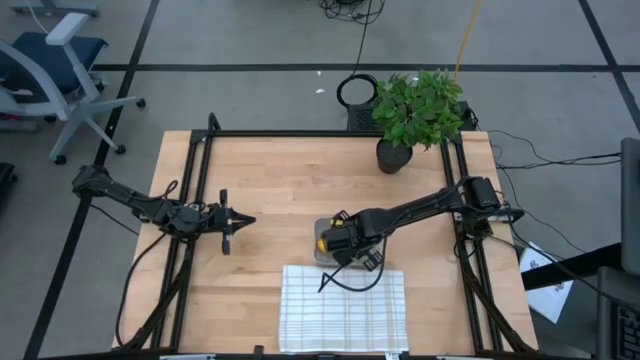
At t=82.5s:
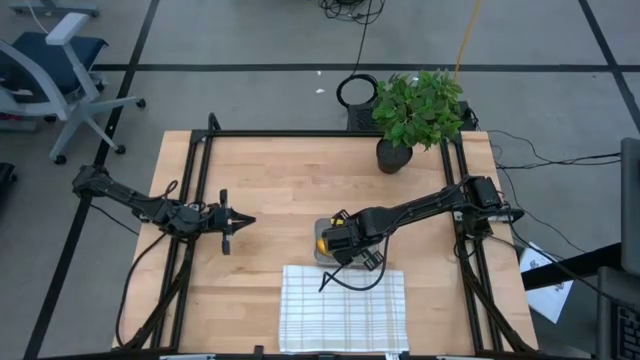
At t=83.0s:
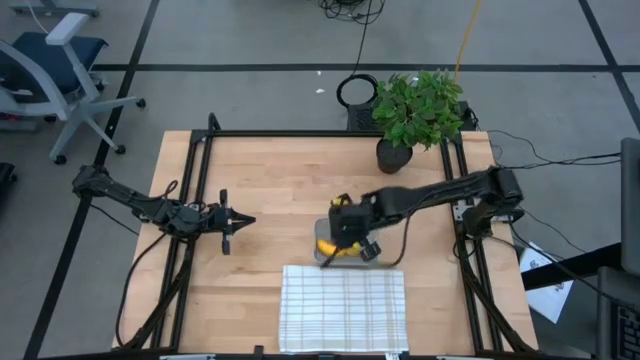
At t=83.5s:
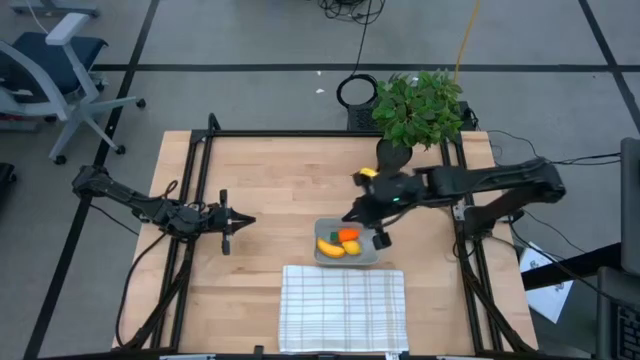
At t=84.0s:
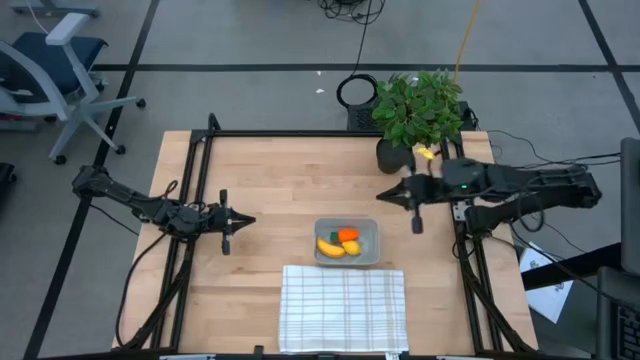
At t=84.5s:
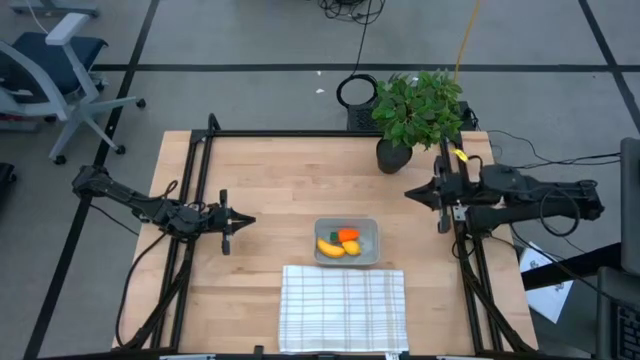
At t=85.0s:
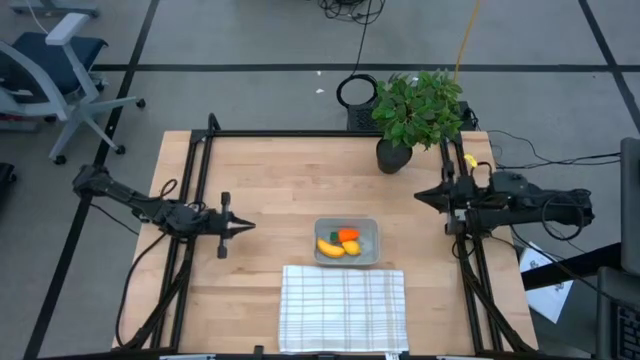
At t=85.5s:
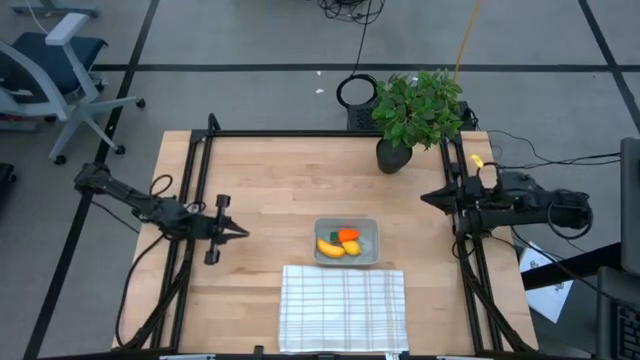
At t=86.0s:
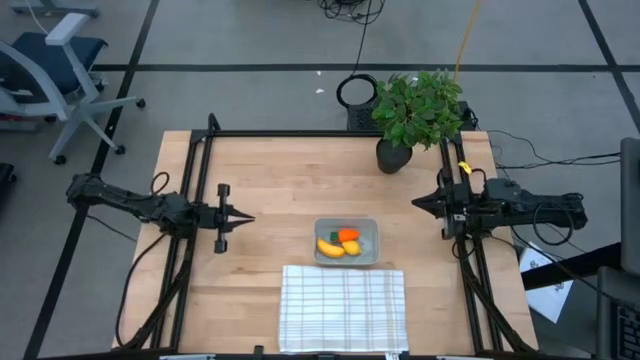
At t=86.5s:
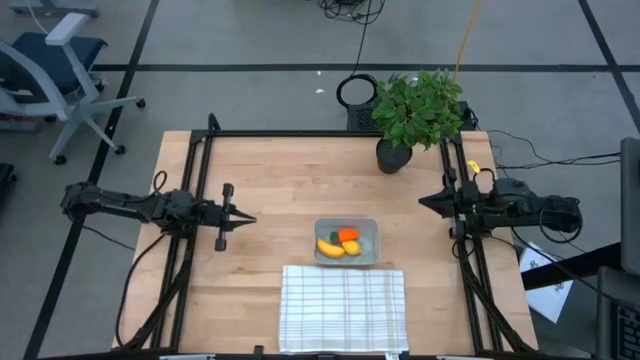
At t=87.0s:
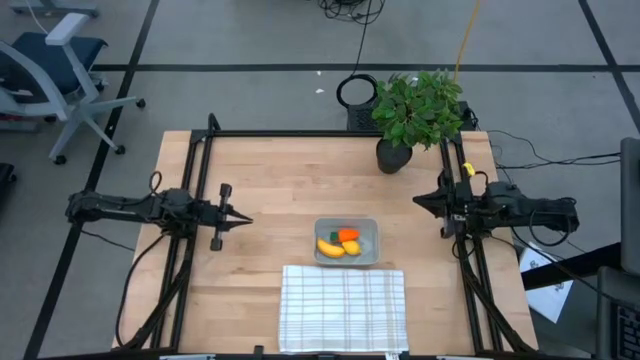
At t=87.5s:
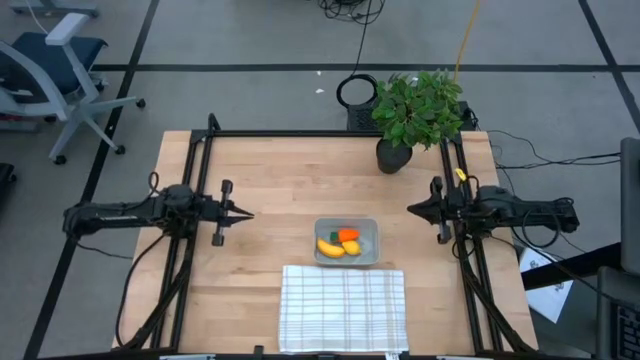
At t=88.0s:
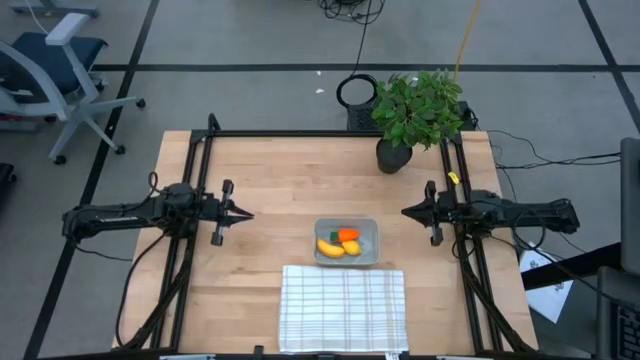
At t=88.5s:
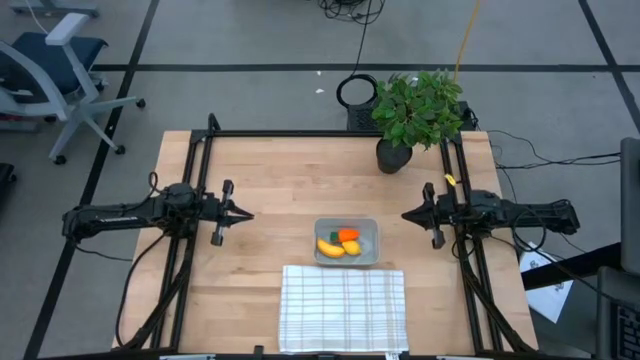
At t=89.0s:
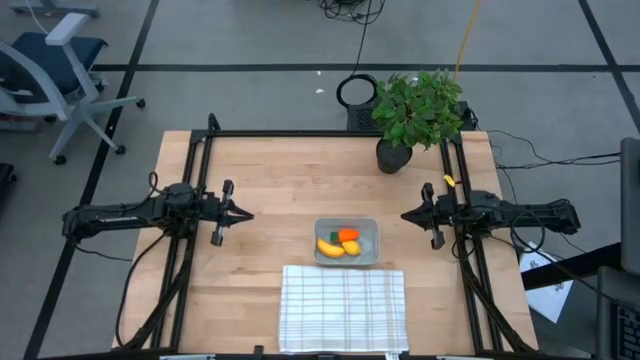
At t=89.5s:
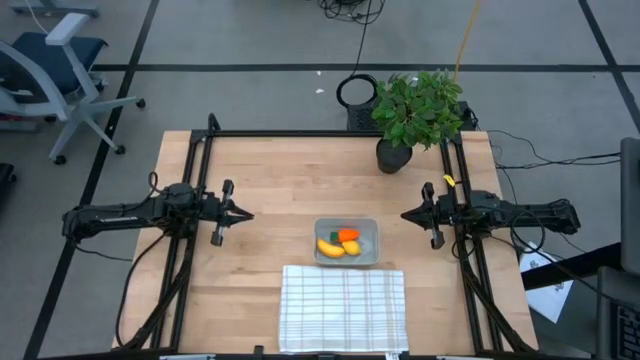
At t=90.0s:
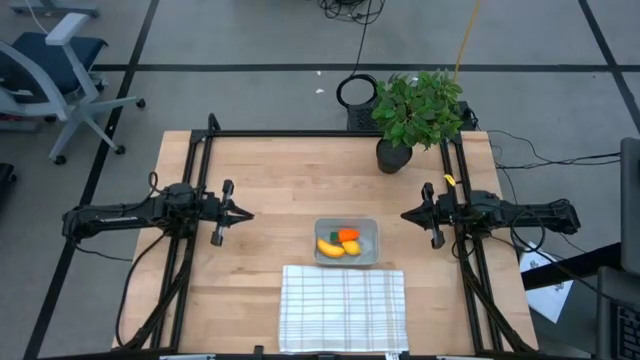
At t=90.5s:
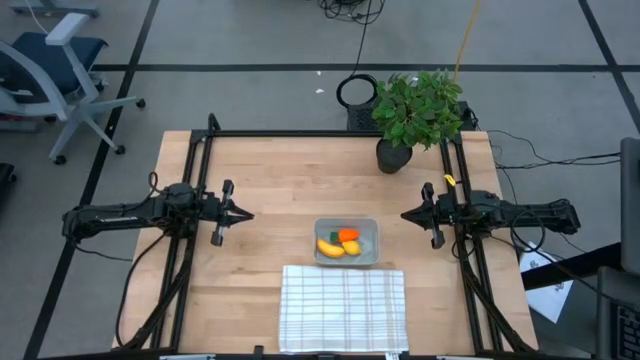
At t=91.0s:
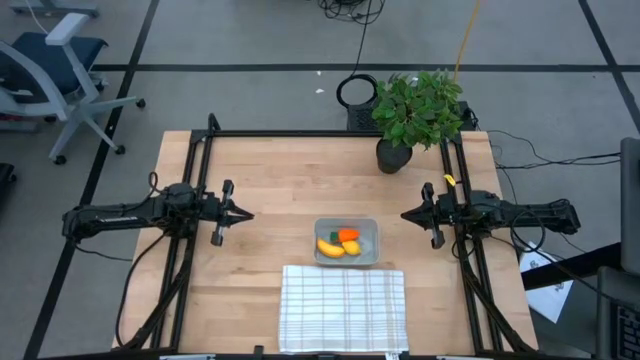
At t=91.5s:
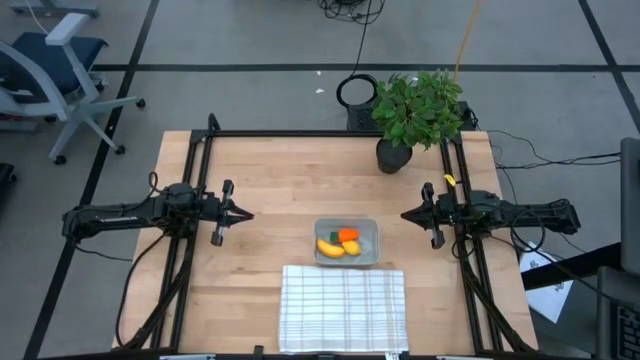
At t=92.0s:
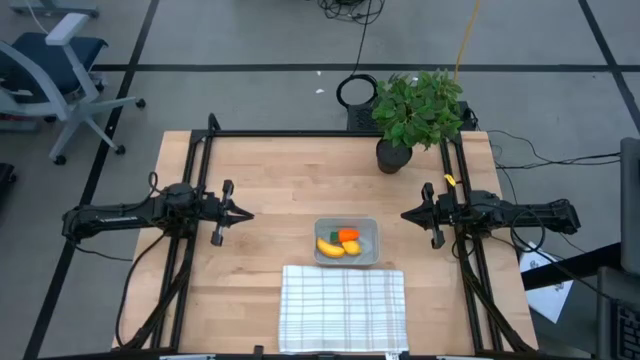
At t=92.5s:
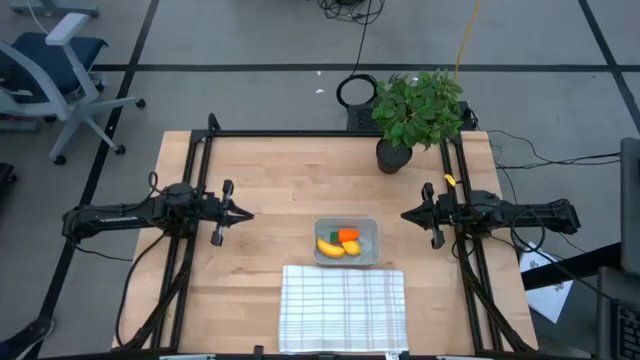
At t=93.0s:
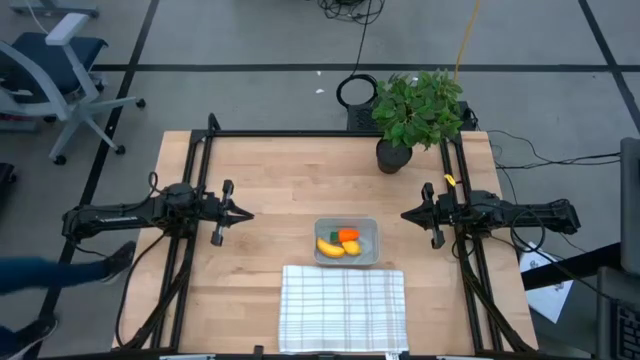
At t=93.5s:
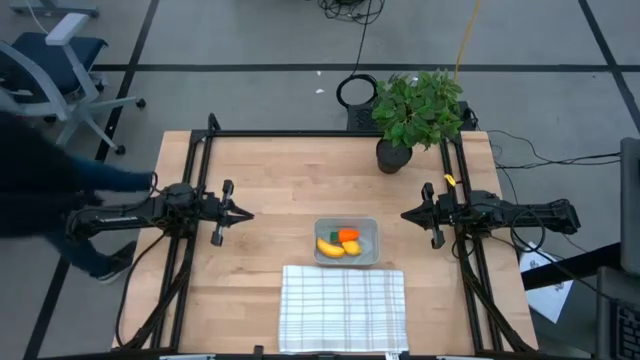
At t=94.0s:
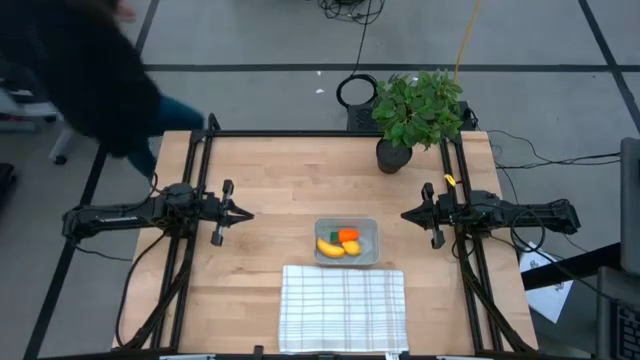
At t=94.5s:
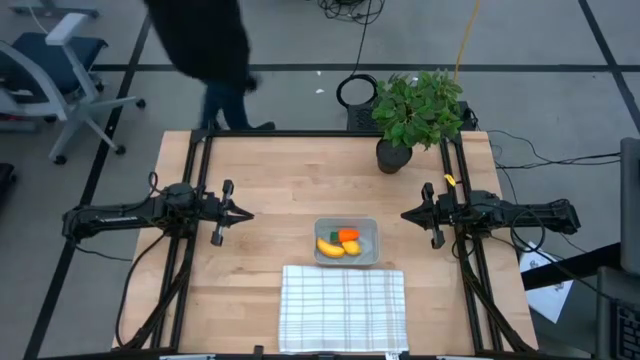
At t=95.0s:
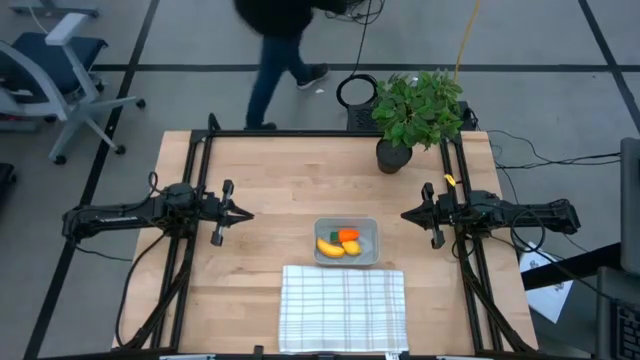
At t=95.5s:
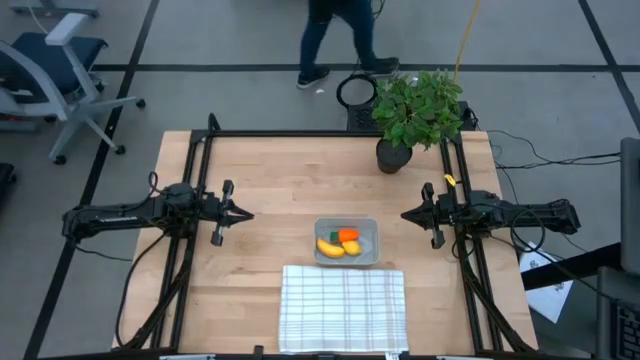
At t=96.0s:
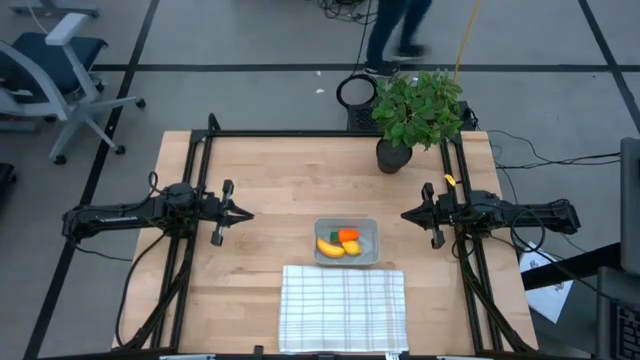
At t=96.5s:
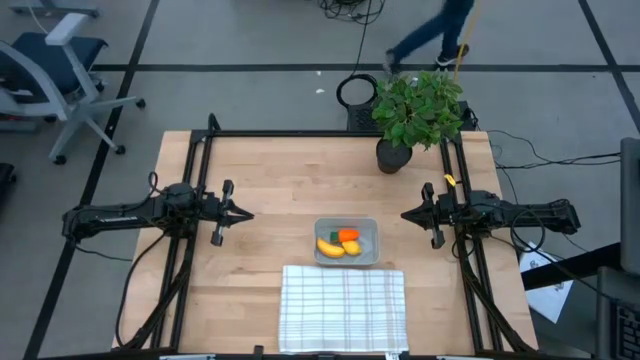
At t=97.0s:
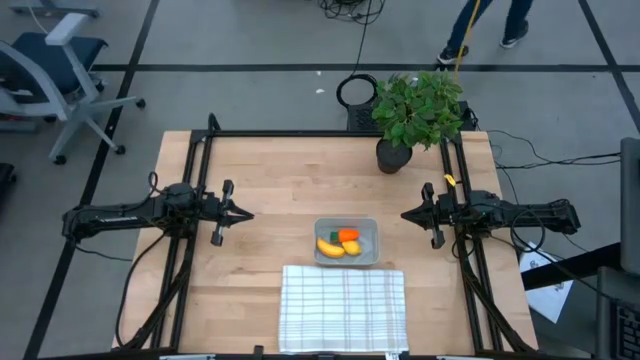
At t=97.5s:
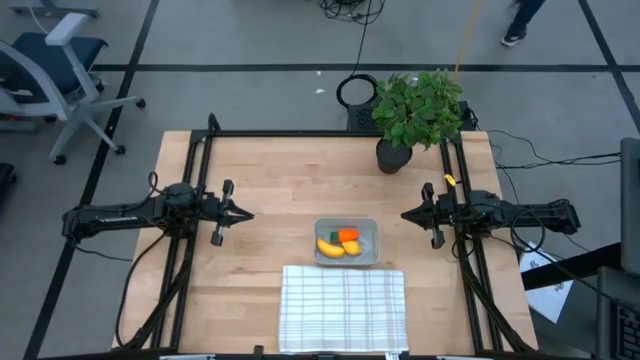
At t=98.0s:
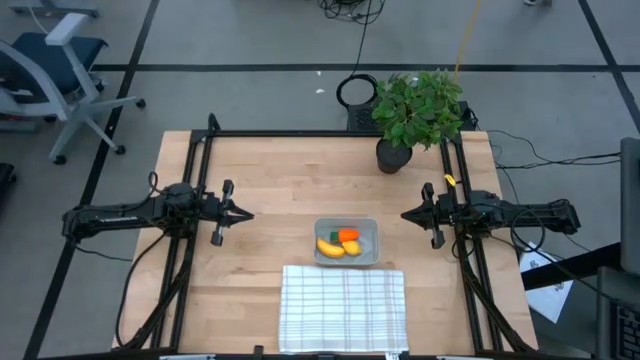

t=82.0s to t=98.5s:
Task: Pick and placing Produce into tupperware
Return to Home Position

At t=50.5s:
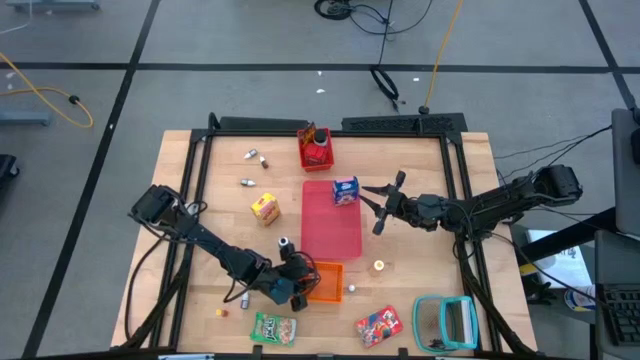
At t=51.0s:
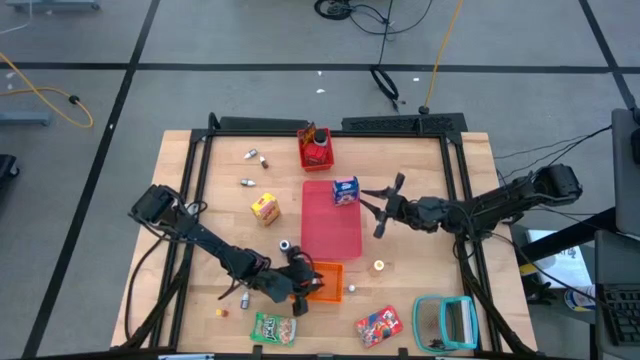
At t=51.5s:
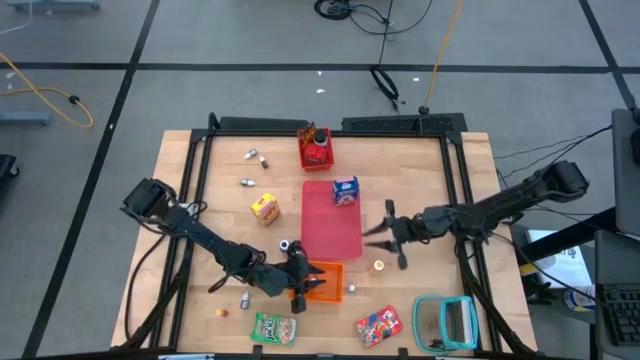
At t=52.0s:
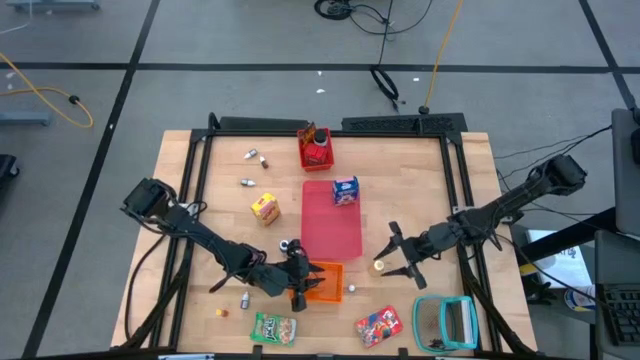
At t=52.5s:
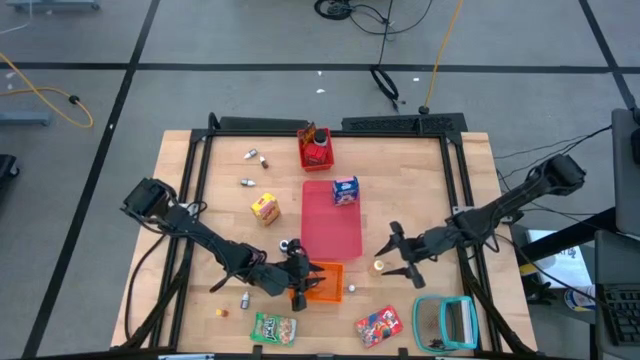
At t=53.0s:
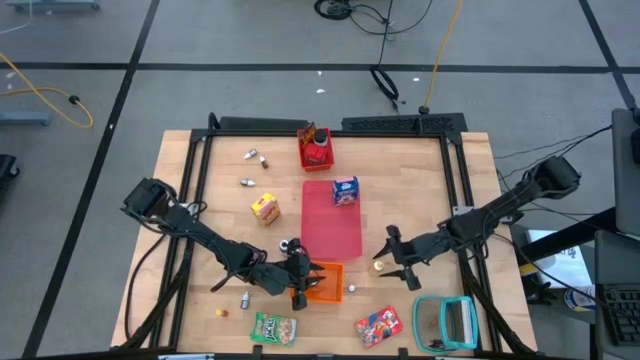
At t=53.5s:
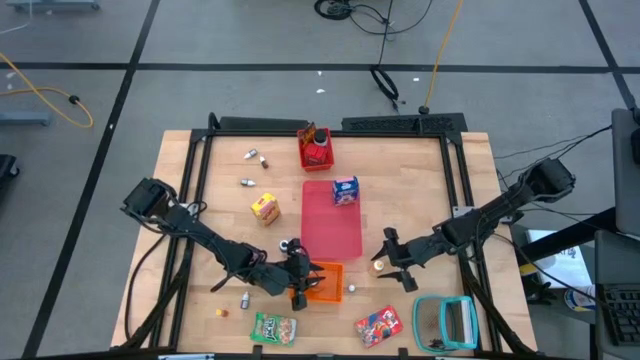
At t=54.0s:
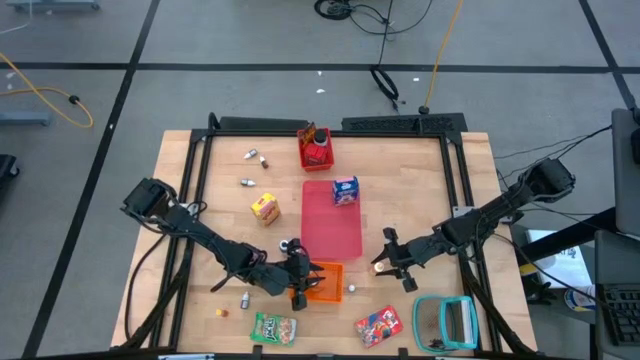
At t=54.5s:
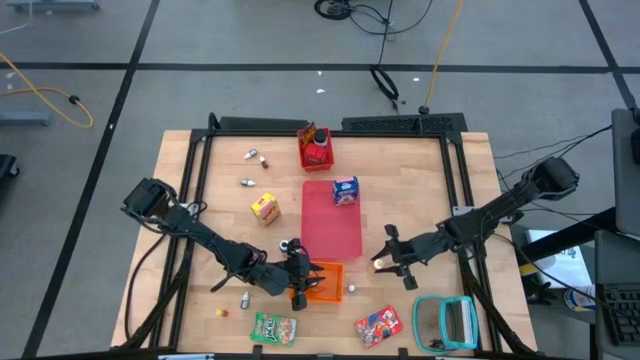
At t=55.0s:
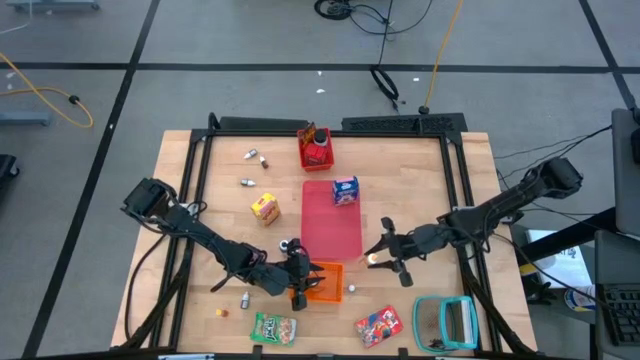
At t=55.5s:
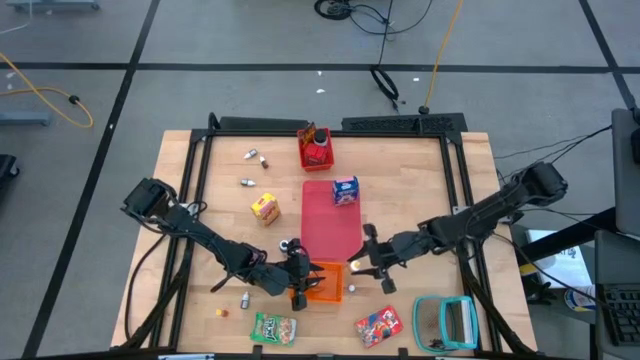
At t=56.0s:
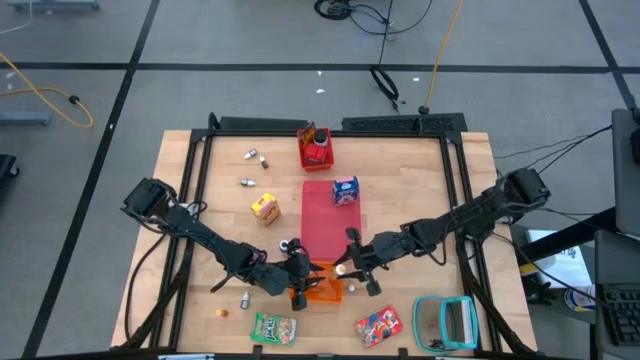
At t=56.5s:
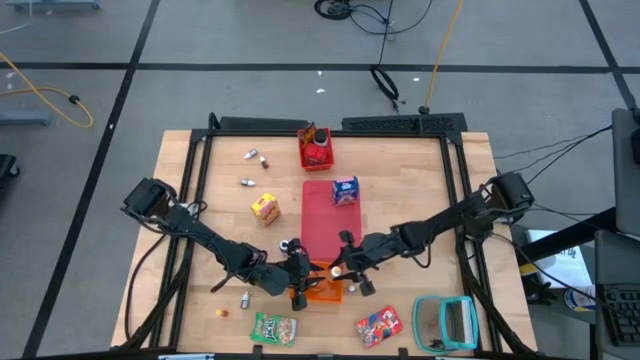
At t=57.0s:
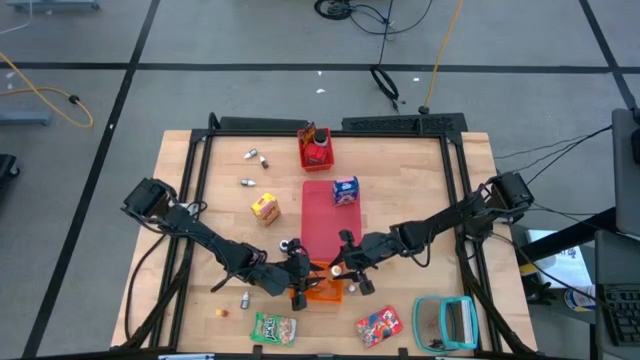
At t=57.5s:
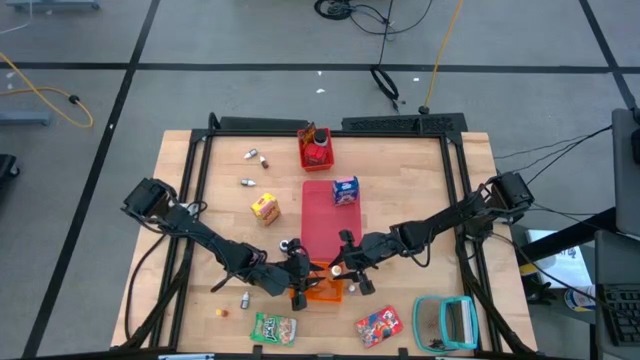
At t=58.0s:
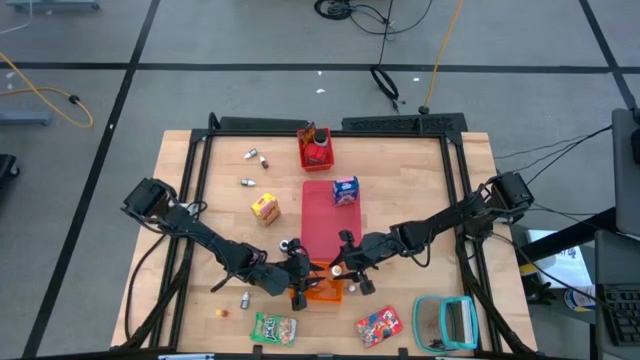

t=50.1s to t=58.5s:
Task: Pick & Place Kitchen Items
Put the big orange food coloring bottle into the orange bin
